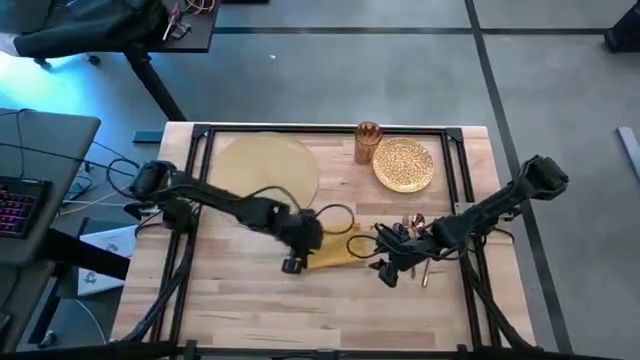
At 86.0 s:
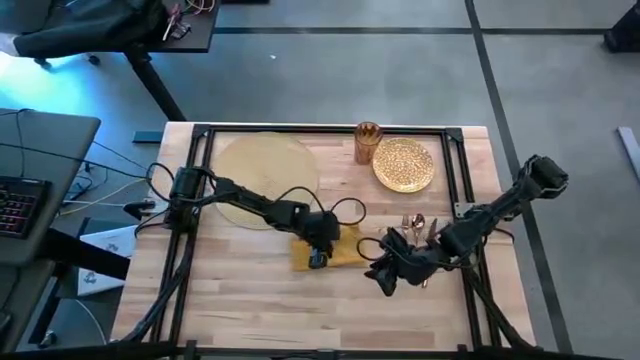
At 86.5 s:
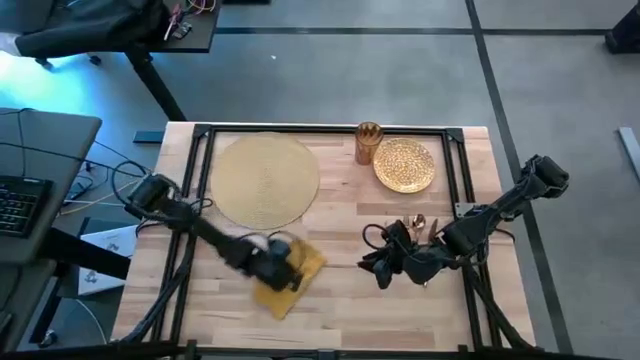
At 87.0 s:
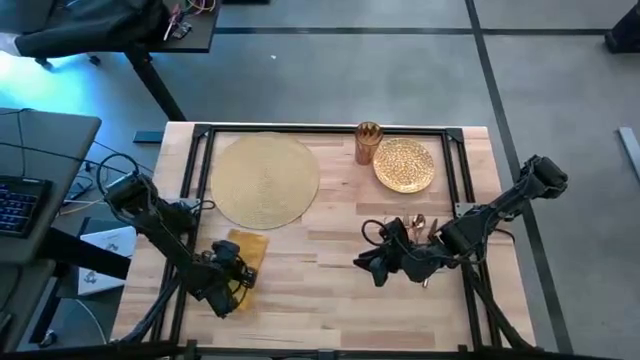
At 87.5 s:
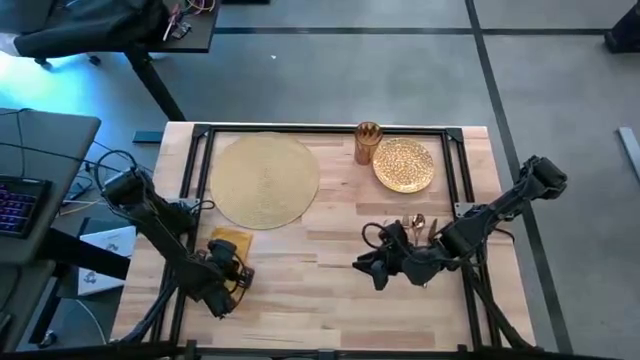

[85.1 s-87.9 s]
Task: Set table place
Move the yellow table napkin to the middle left of the table

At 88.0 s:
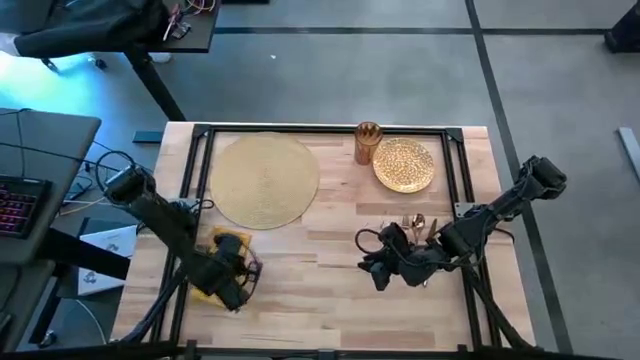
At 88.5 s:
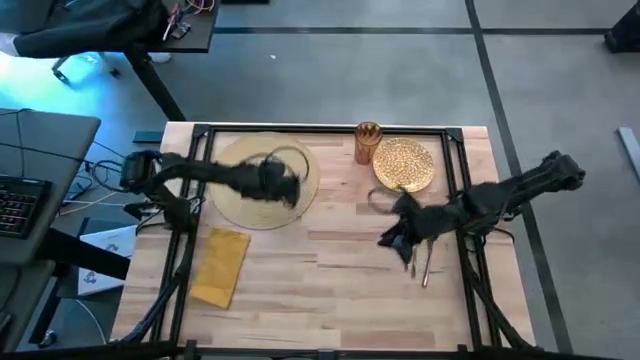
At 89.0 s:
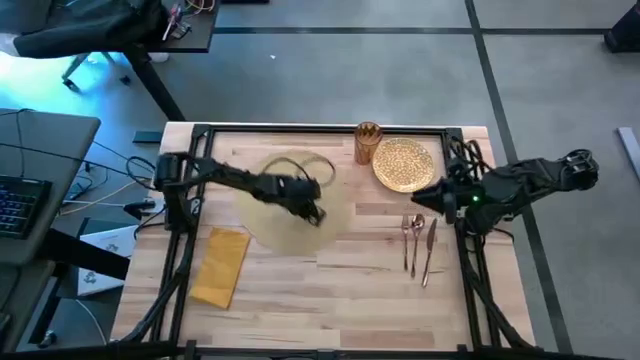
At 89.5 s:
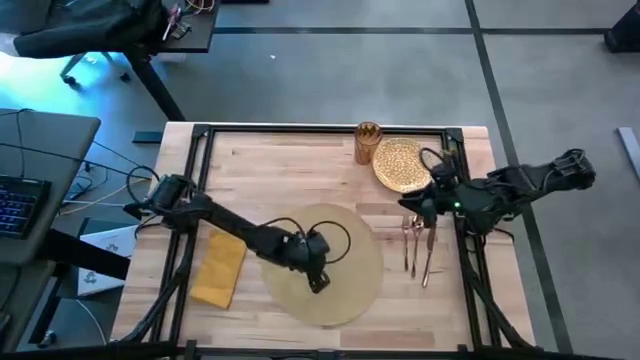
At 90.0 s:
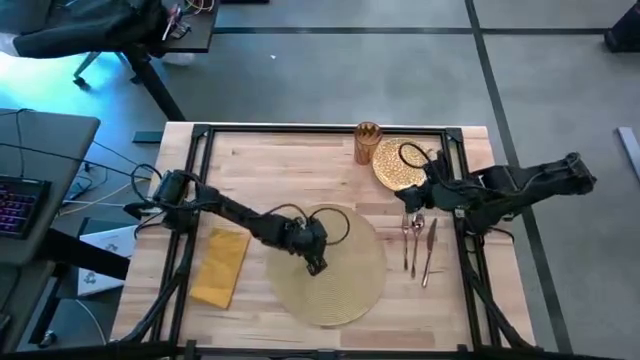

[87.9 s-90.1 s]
Move the yellow tablemat to the center of the table

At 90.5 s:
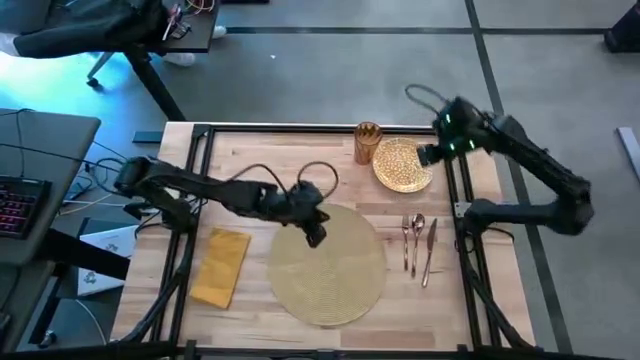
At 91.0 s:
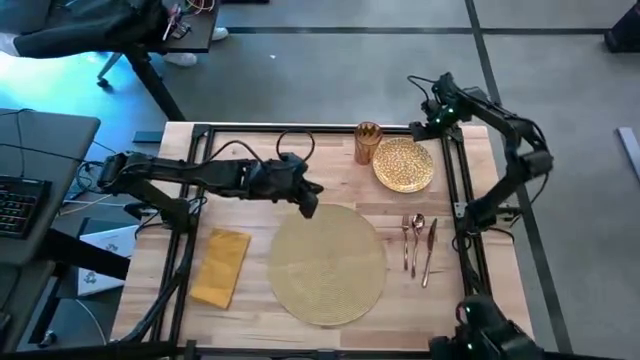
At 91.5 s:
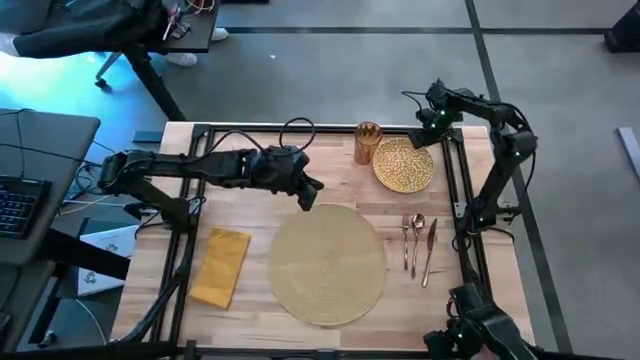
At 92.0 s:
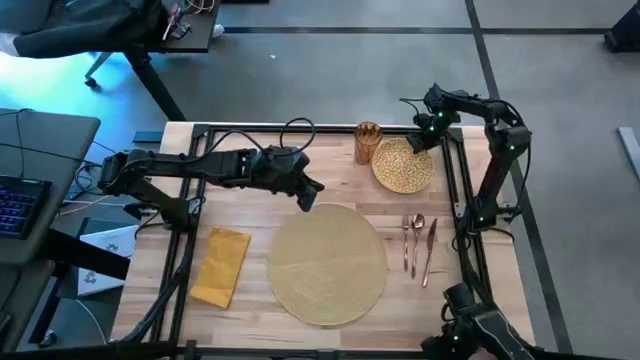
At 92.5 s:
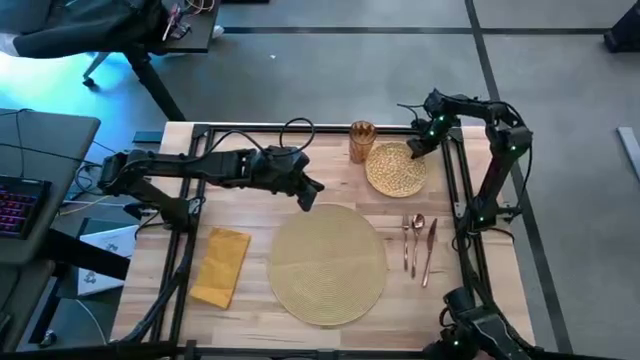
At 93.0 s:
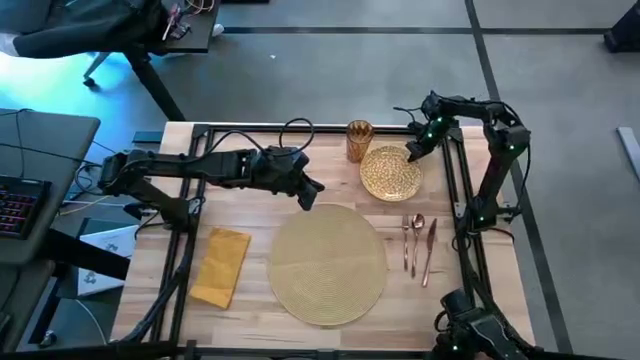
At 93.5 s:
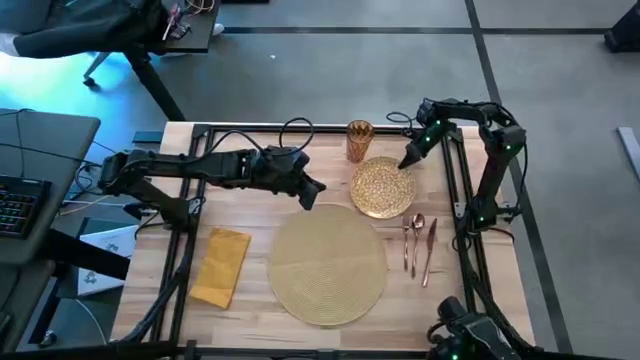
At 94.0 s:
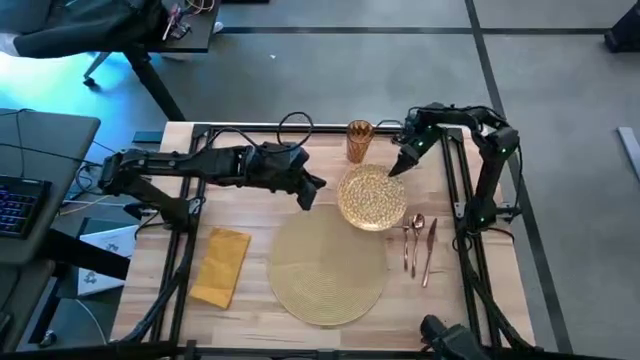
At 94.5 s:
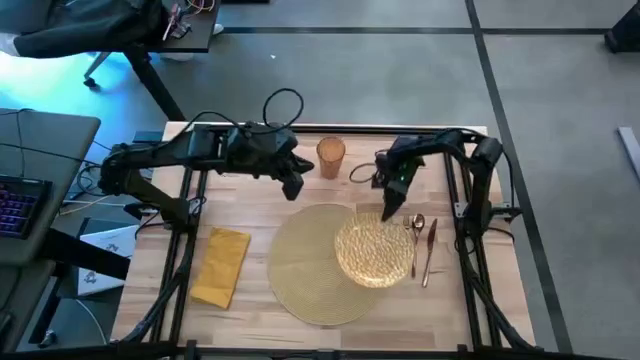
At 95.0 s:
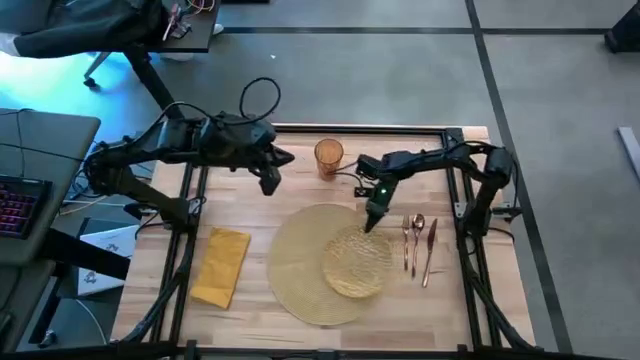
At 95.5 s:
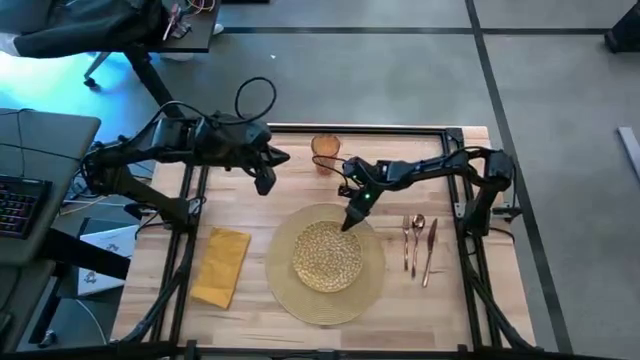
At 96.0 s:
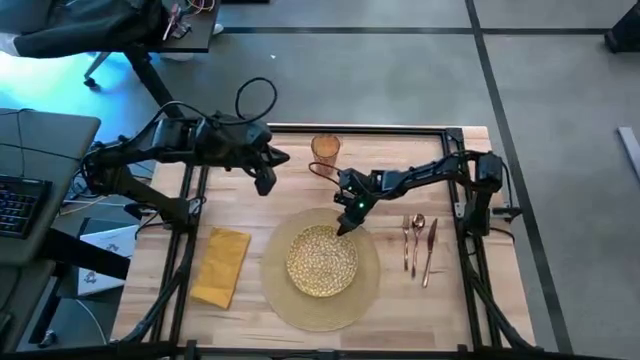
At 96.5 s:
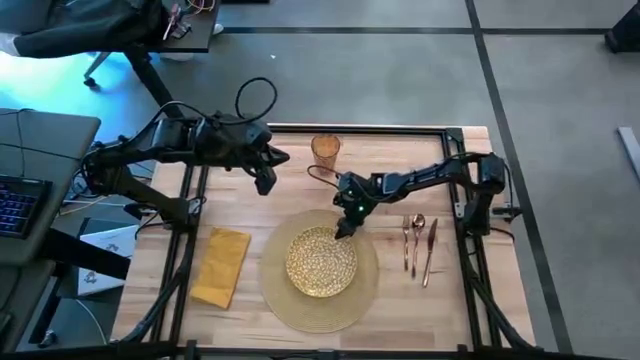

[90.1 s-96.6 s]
Put the yellow plate on the center of the yellow tablemat

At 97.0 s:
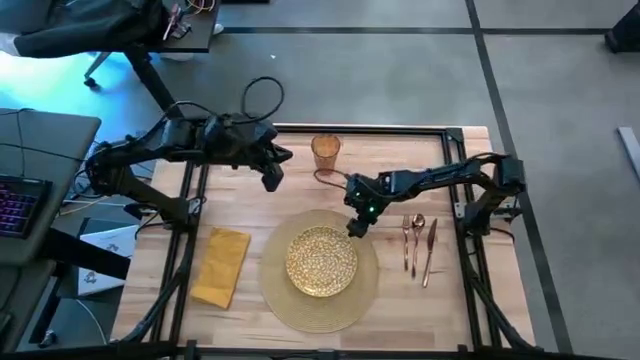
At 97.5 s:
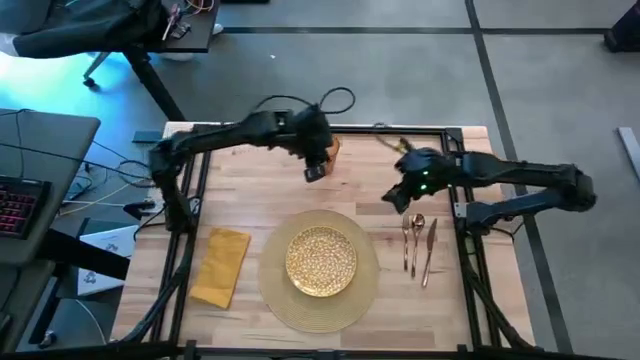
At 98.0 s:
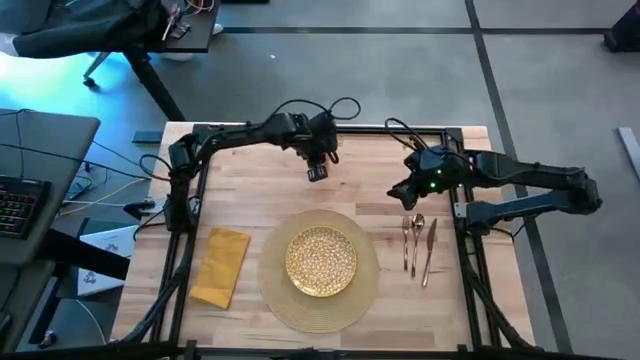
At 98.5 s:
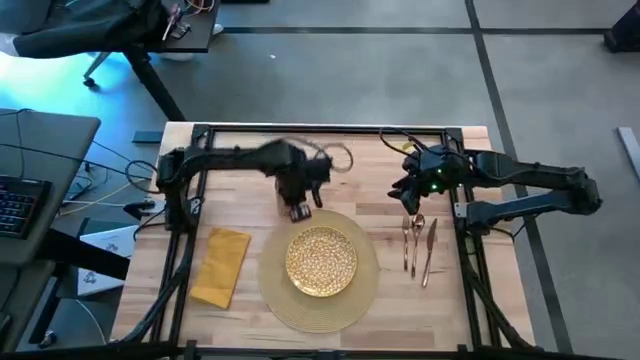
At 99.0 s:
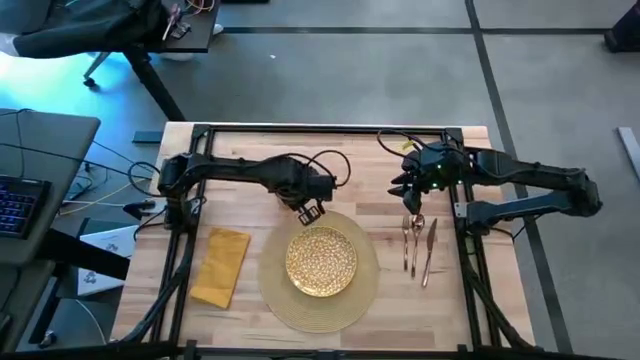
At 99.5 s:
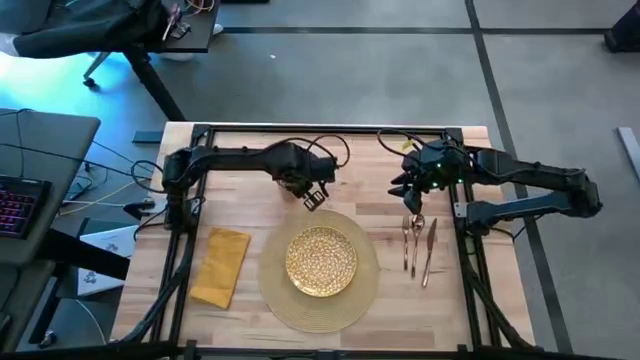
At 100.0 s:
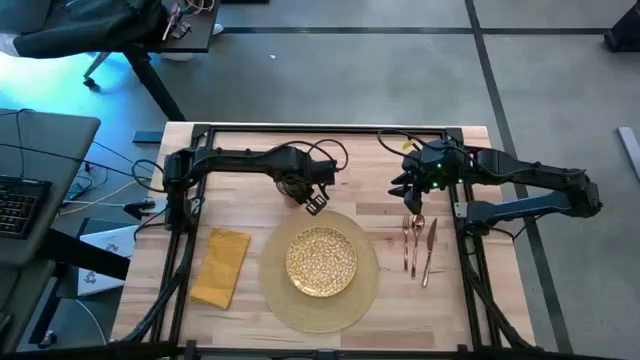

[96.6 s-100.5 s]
Move the brown cup to the top left of the yellow tablemat

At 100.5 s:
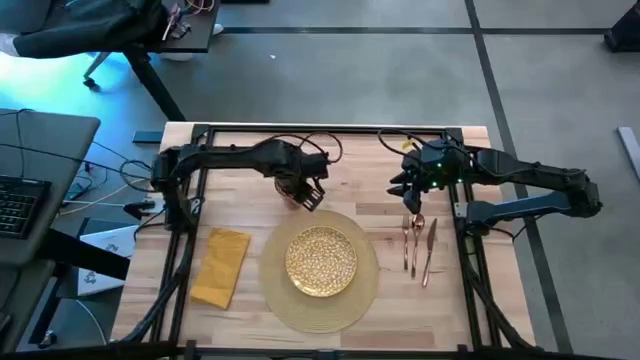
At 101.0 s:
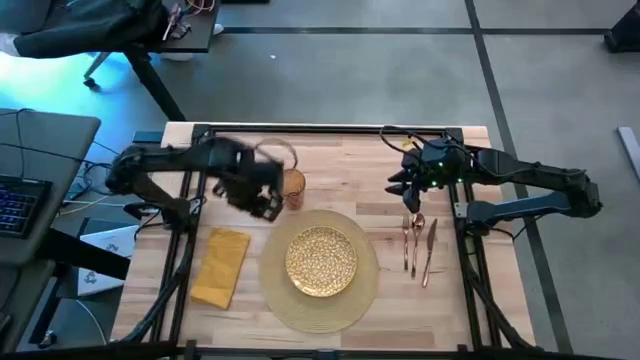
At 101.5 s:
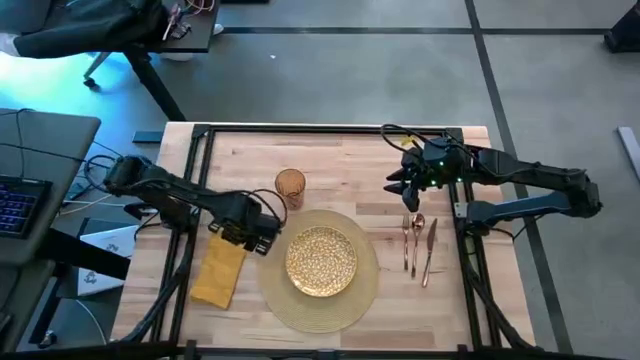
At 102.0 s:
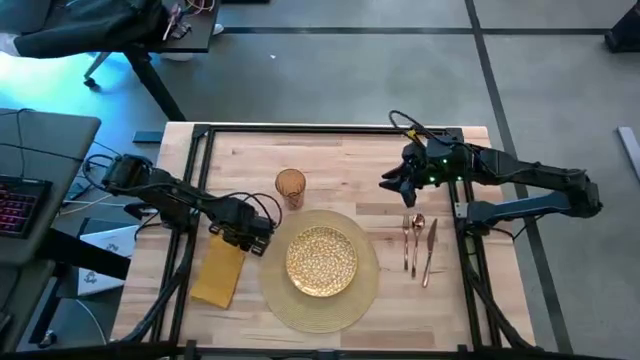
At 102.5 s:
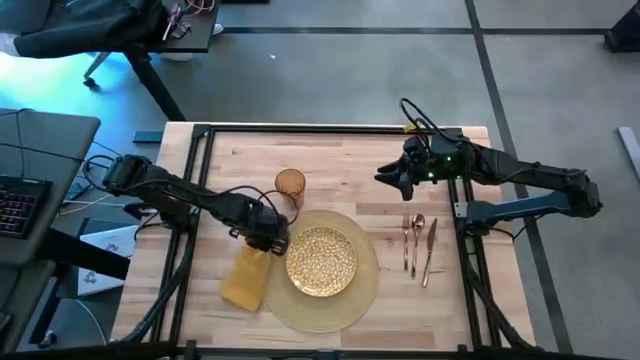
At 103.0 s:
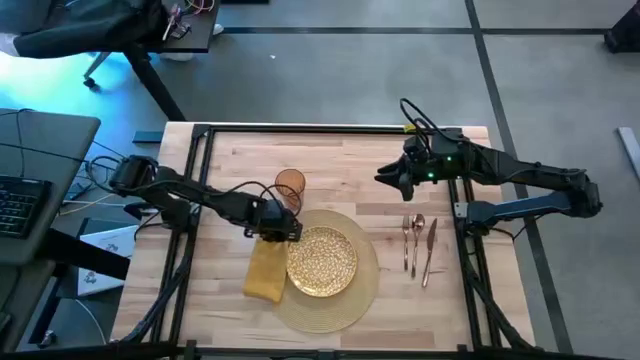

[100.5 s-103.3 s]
Put the yellow table napkin on the yellow tablemat to the left of the yellow plate

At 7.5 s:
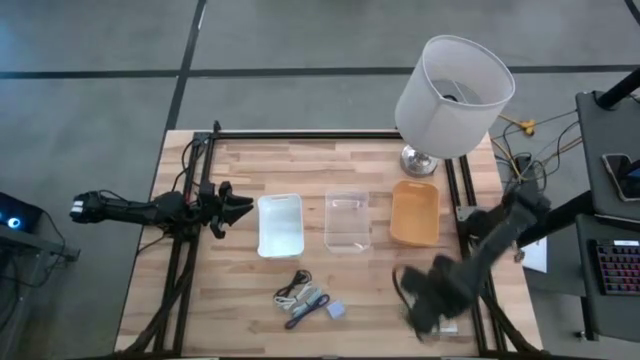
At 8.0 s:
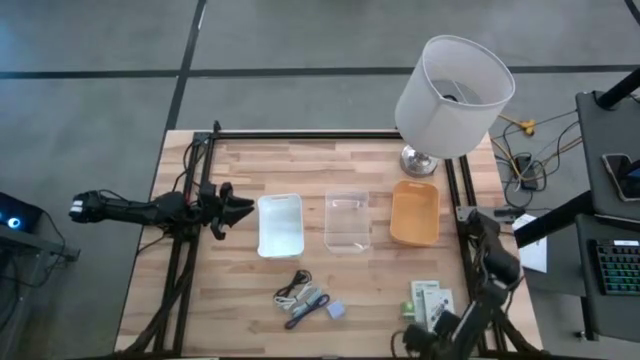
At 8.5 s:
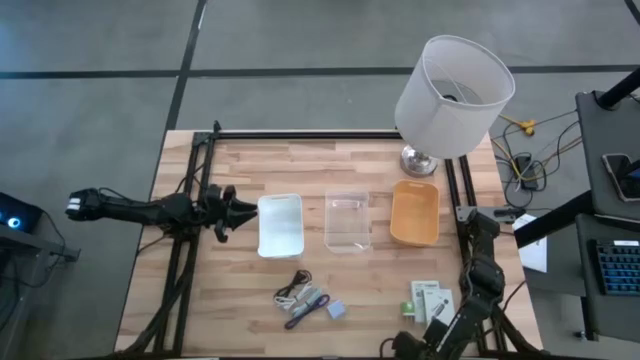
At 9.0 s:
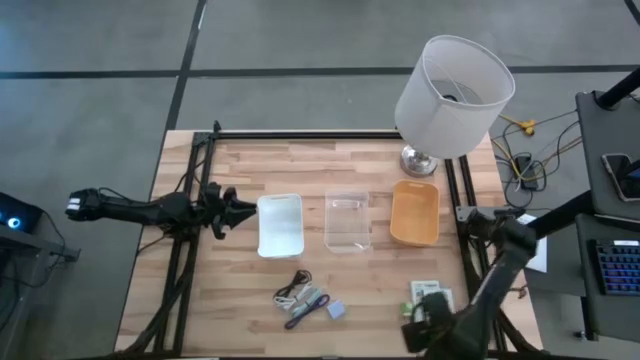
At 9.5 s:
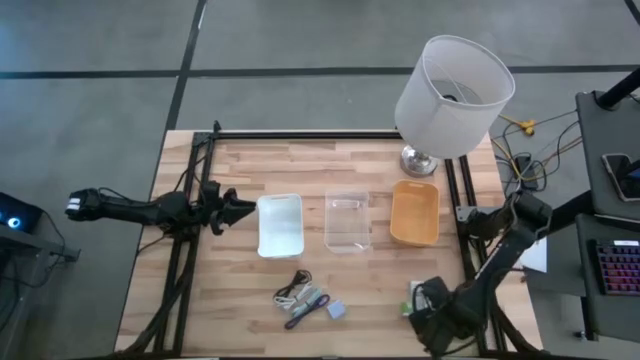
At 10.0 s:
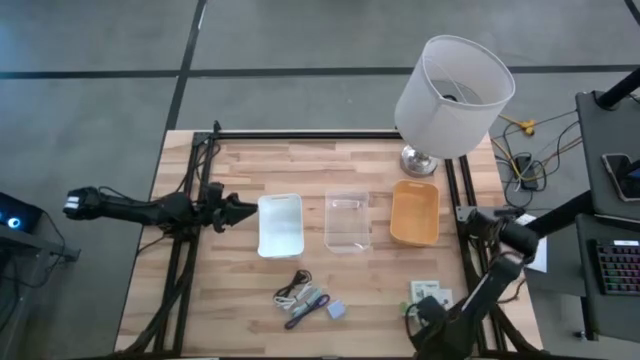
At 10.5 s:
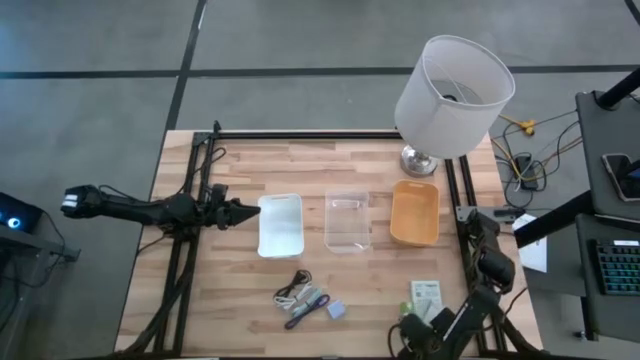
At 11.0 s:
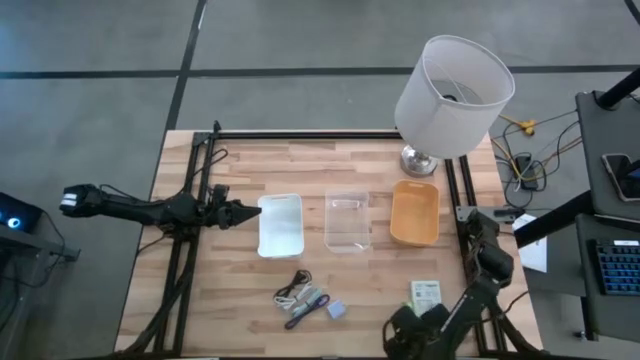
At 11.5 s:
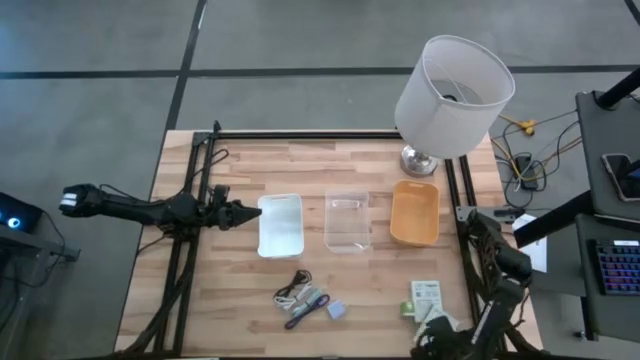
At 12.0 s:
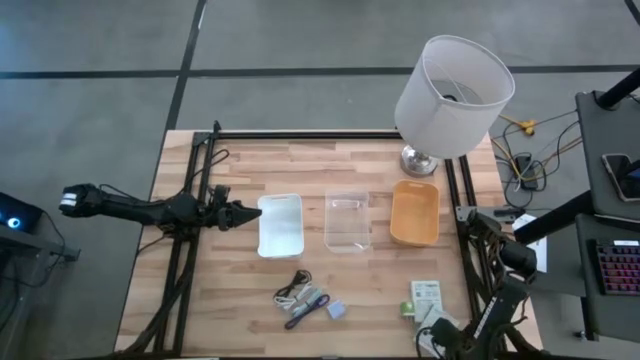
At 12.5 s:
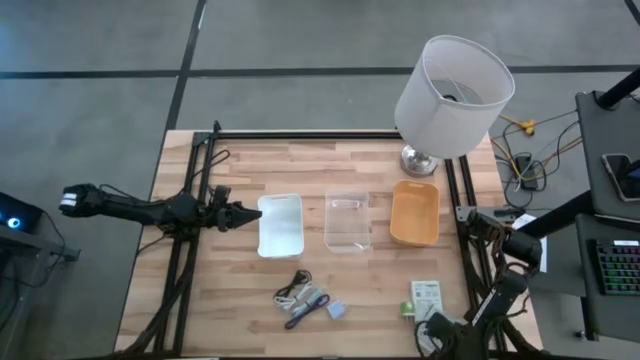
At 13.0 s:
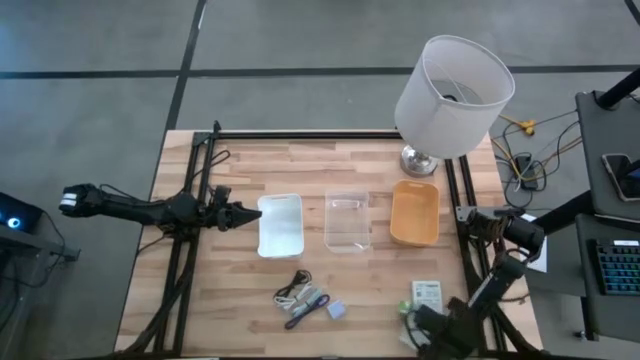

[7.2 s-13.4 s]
Task: Pick and place items into bin
Adjust the card reader box
